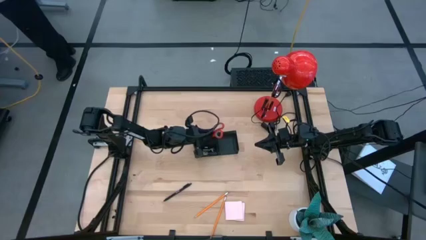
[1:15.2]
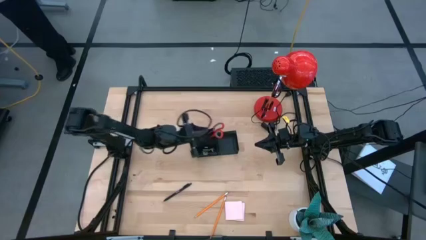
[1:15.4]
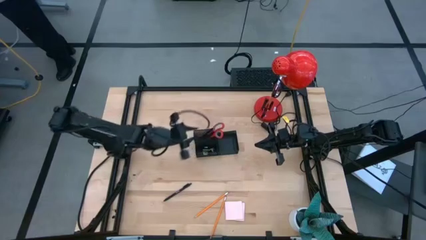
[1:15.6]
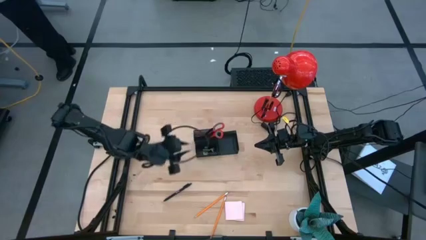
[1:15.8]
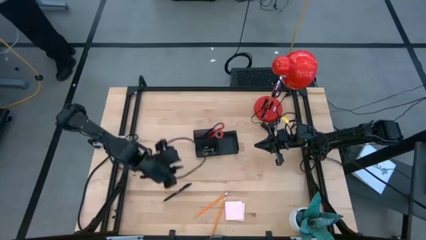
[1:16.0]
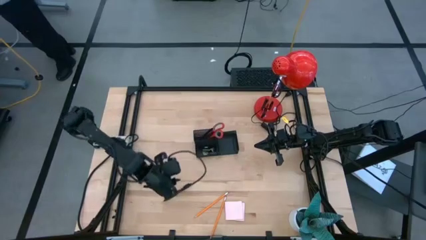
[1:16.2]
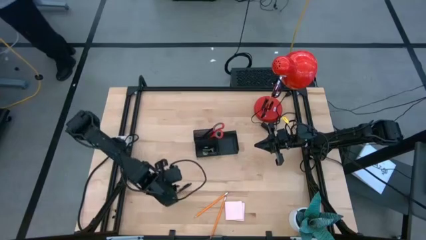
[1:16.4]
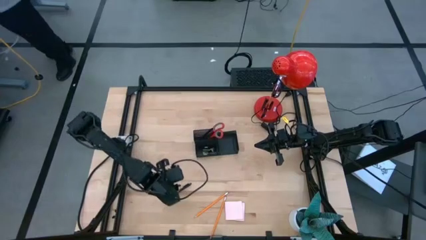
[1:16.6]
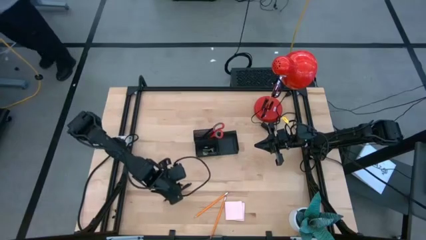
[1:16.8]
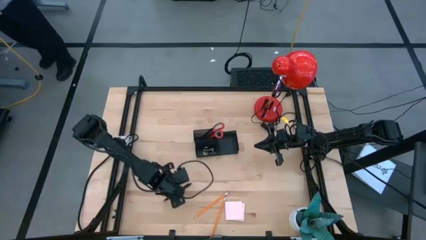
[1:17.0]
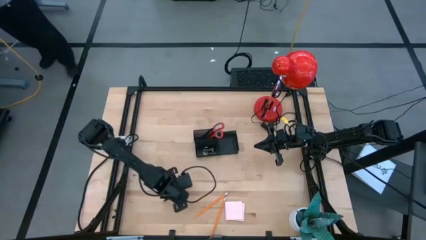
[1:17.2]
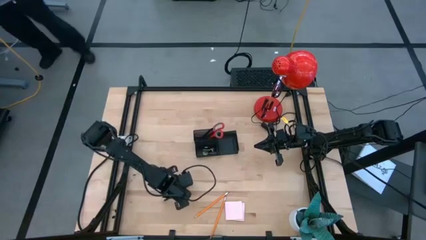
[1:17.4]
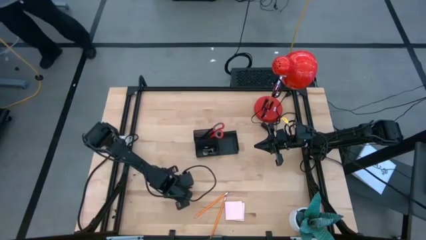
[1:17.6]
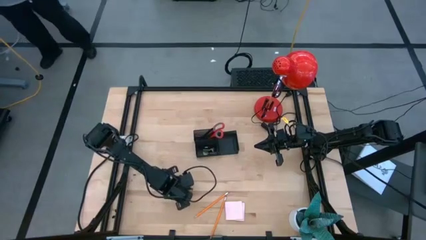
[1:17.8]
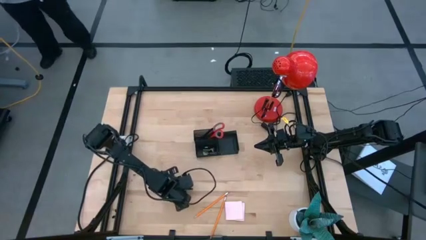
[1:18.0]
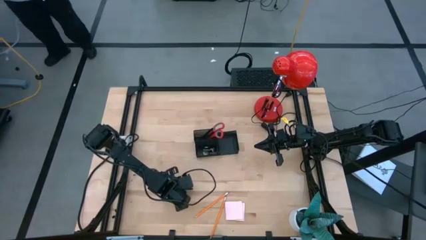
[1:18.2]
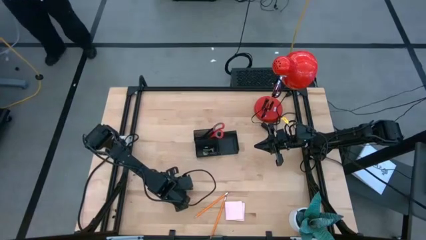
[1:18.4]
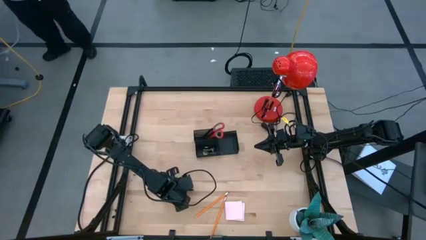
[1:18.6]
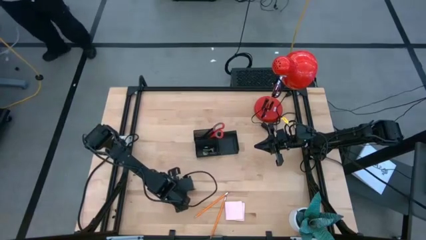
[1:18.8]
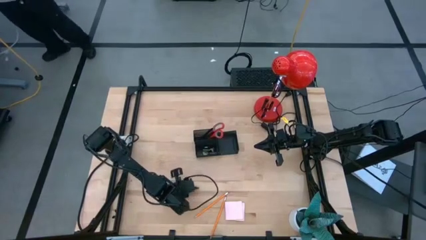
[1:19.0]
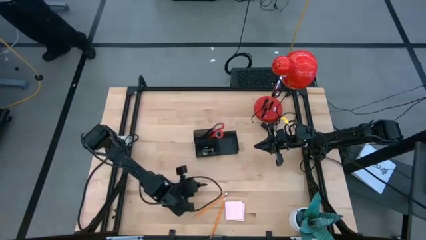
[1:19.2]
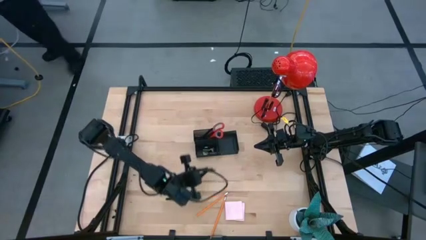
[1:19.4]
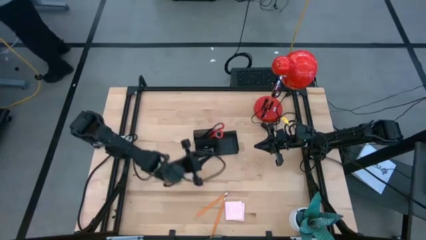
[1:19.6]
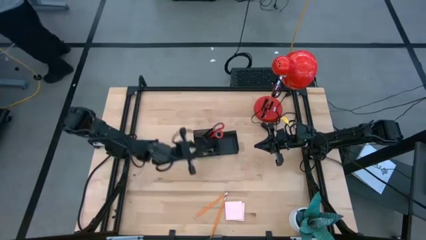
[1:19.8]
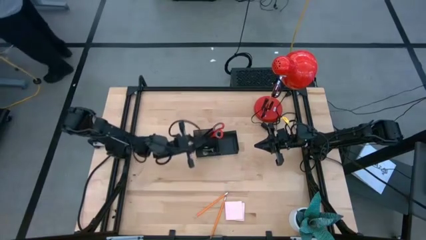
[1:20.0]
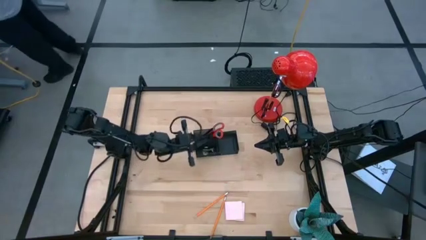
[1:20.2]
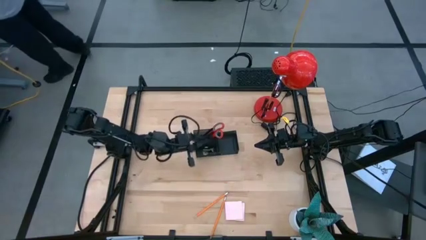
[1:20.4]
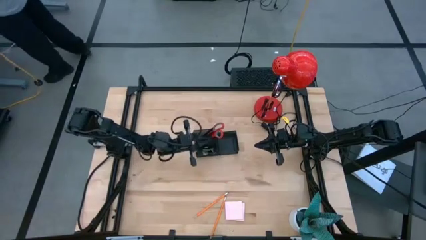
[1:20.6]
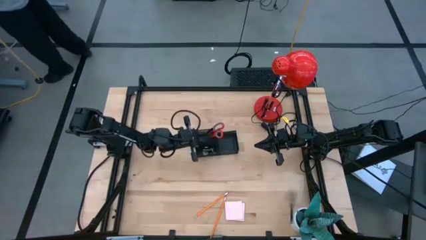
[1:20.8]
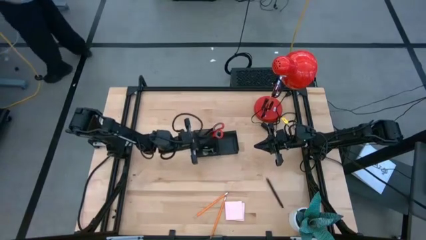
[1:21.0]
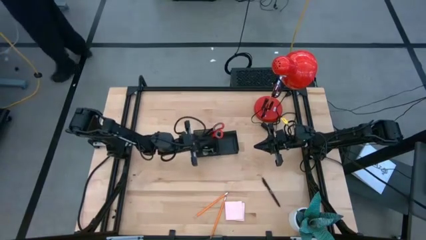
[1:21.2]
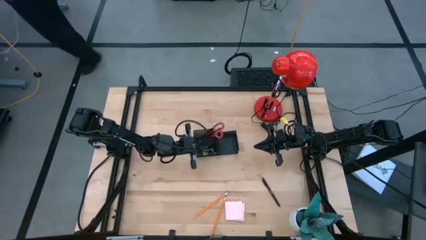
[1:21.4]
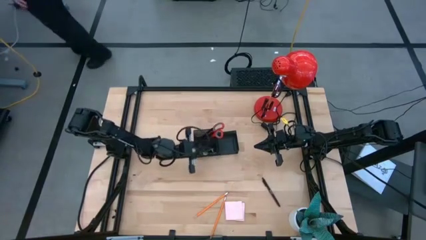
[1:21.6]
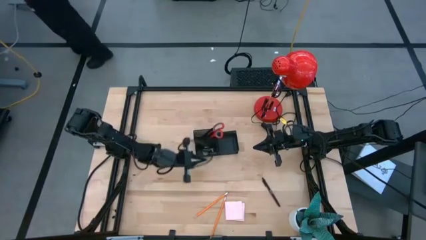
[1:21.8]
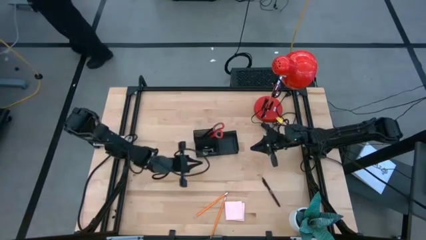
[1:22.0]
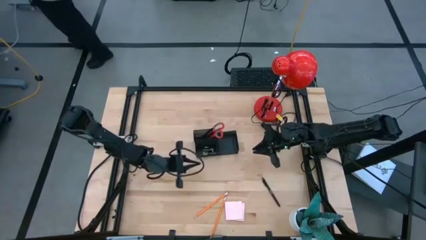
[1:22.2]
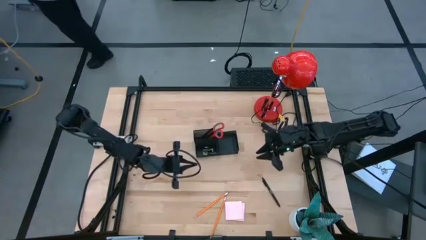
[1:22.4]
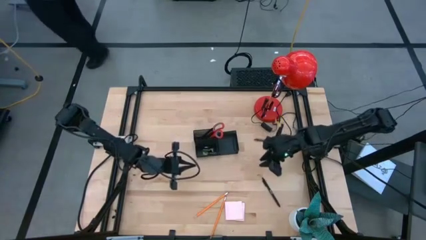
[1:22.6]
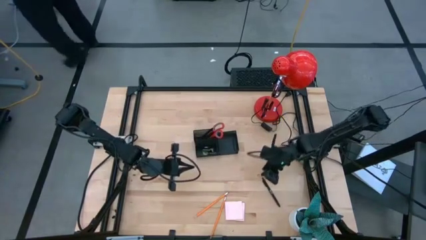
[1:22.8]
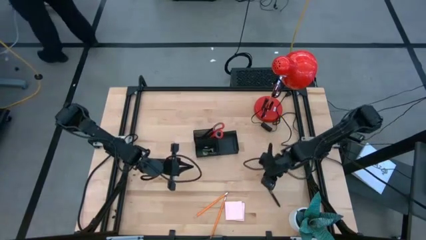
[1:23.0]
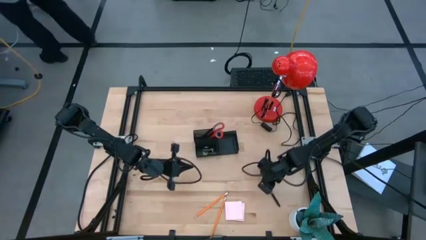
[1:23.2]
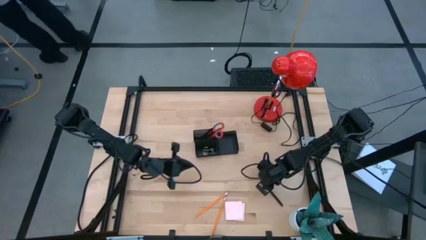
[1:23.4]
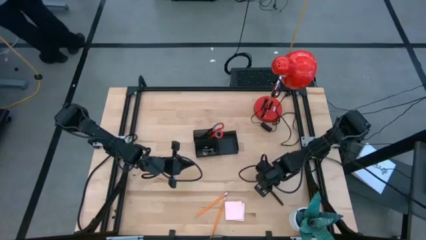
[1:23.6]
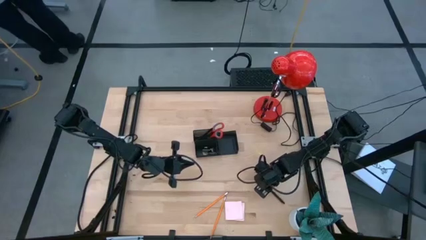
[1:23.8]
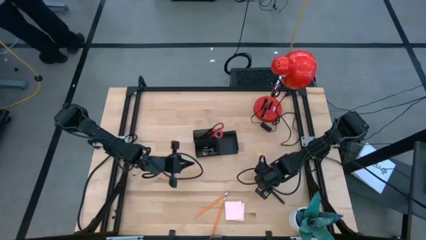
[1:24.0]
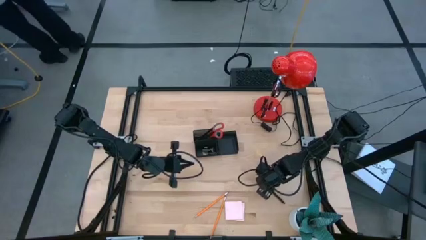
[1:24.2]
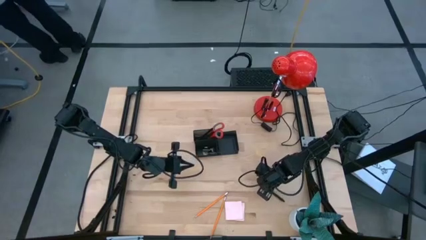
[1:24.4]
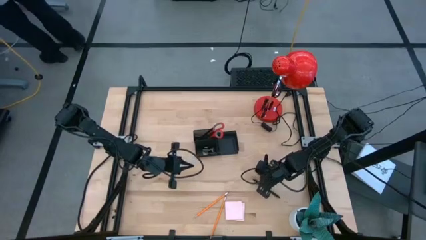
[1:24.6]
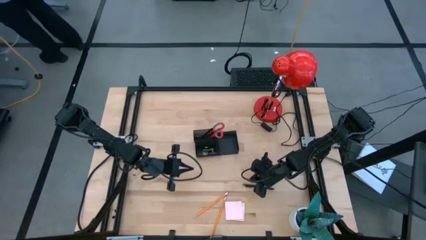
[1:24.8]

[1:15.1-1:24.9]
Task: Pick and place office supplies into organizer
Put the pen into the desk organizer
